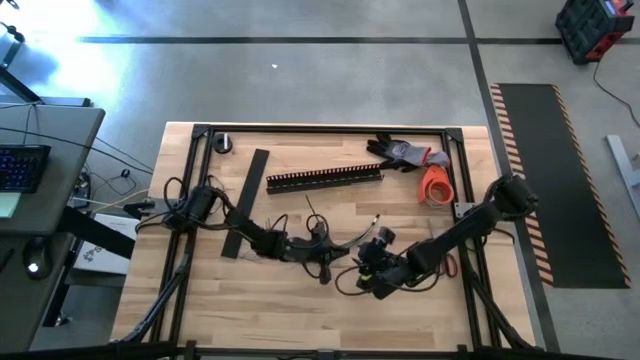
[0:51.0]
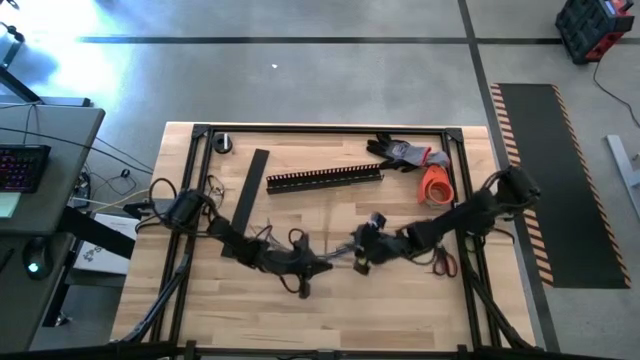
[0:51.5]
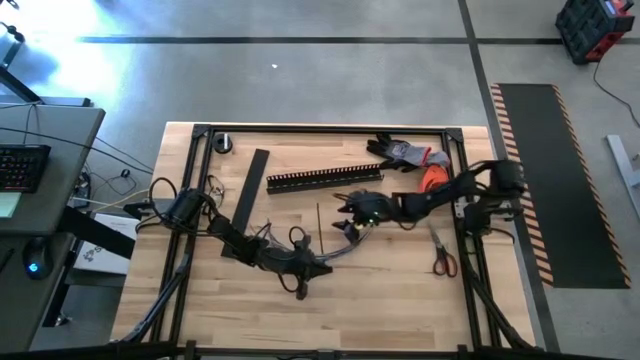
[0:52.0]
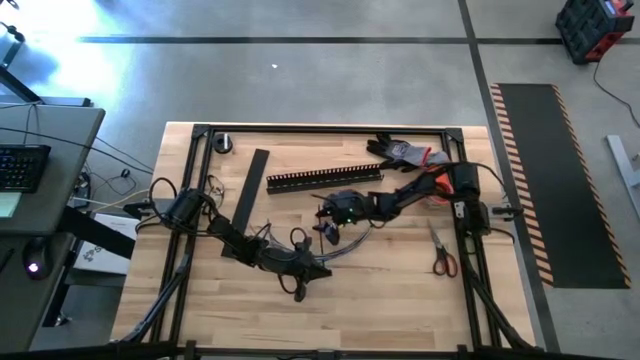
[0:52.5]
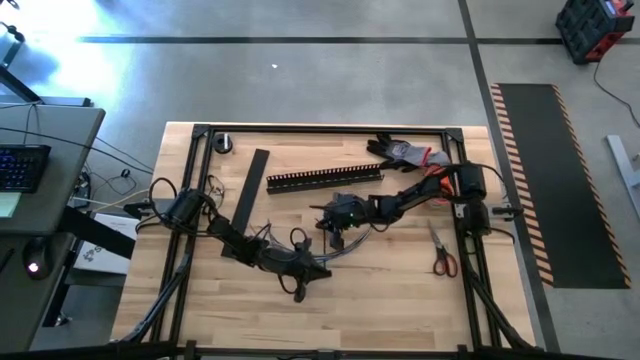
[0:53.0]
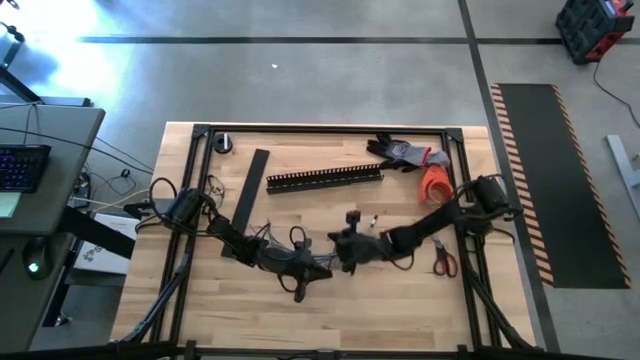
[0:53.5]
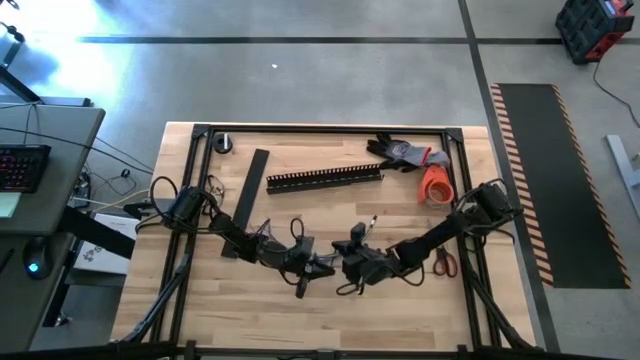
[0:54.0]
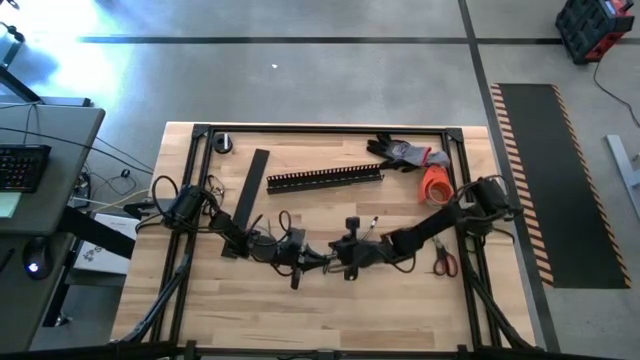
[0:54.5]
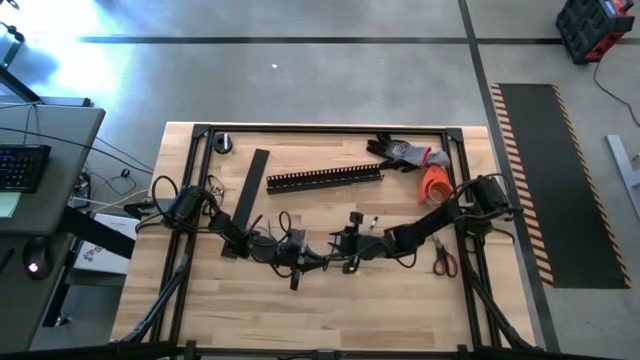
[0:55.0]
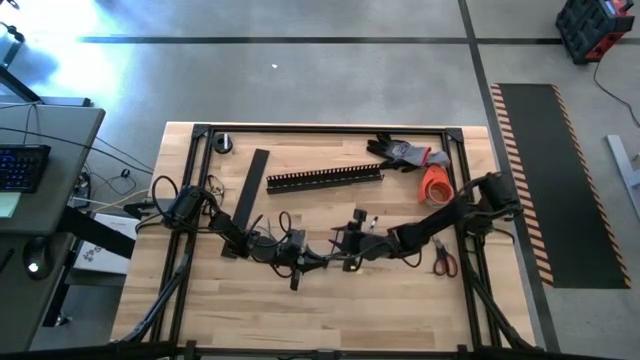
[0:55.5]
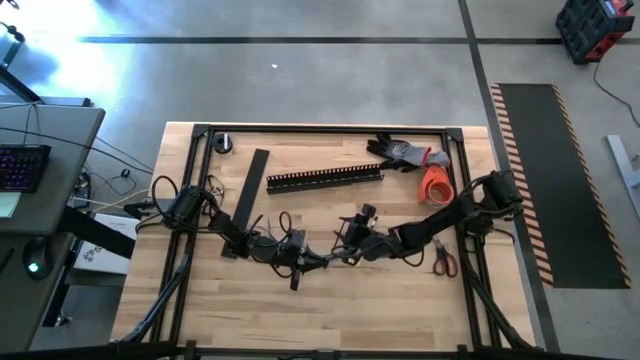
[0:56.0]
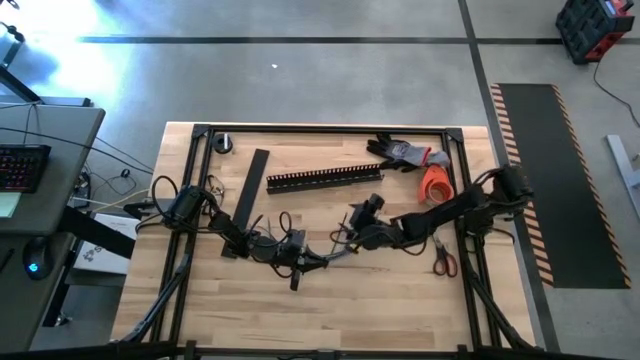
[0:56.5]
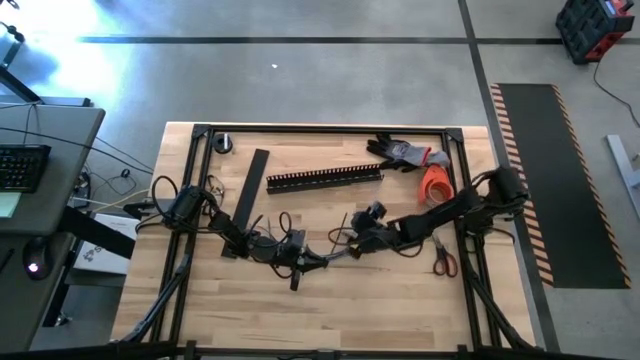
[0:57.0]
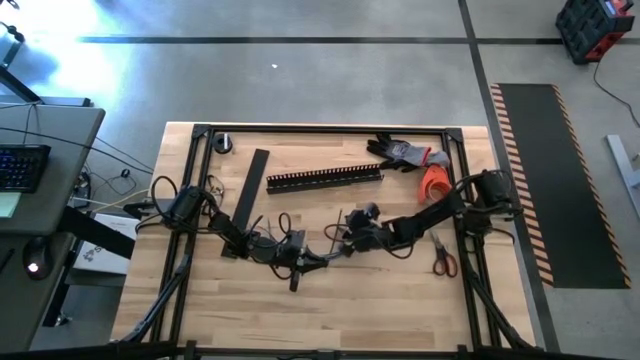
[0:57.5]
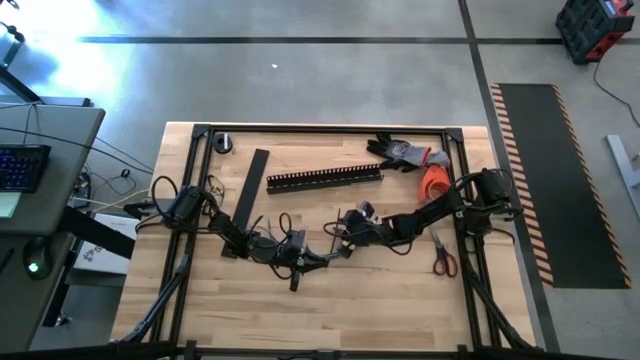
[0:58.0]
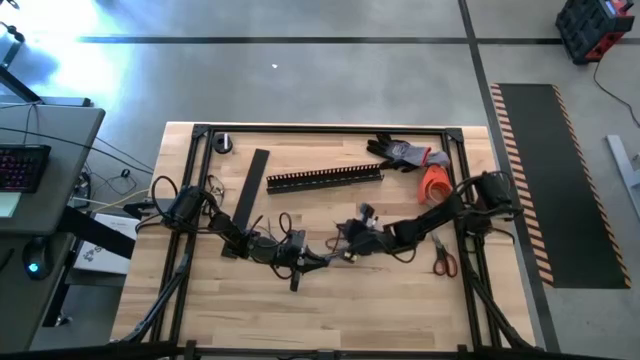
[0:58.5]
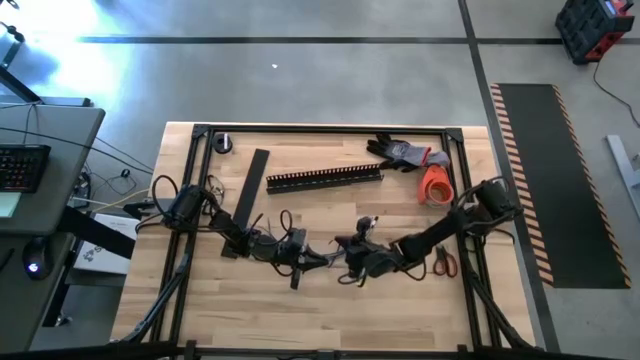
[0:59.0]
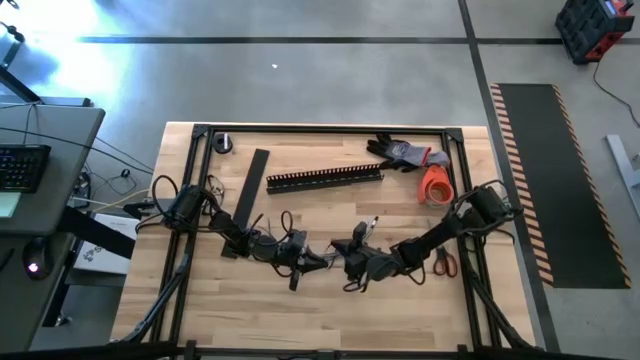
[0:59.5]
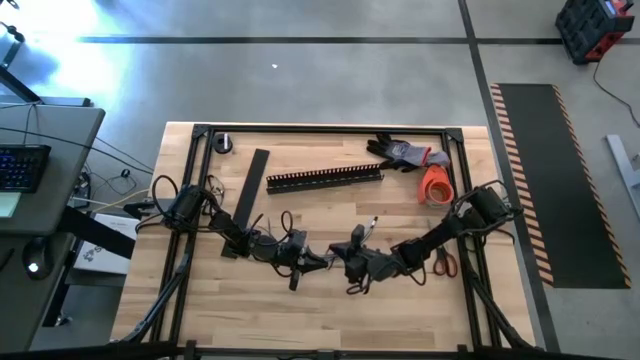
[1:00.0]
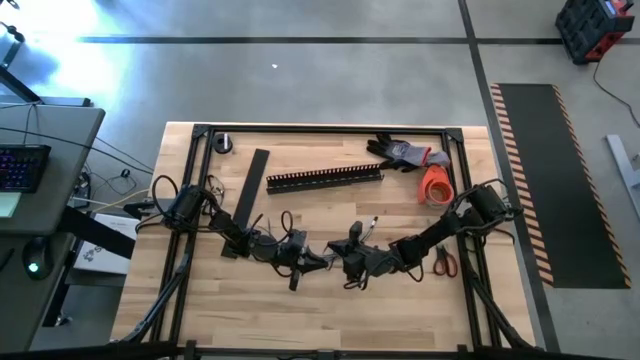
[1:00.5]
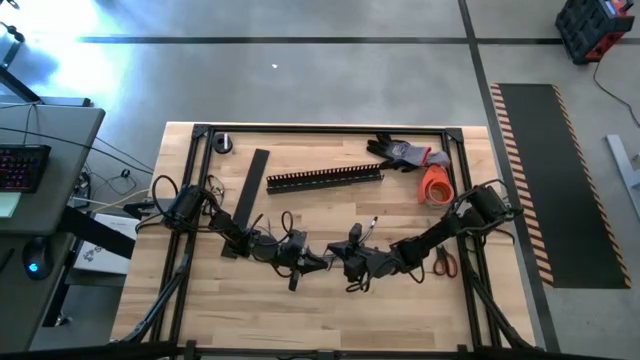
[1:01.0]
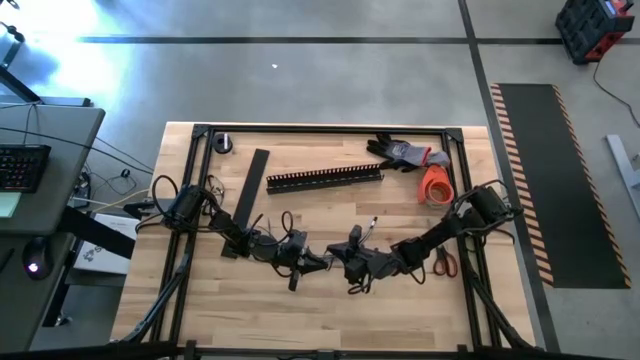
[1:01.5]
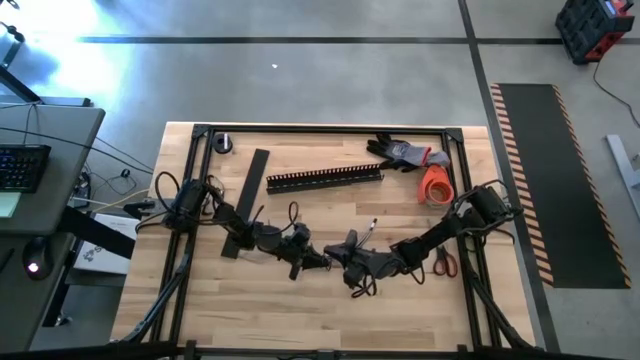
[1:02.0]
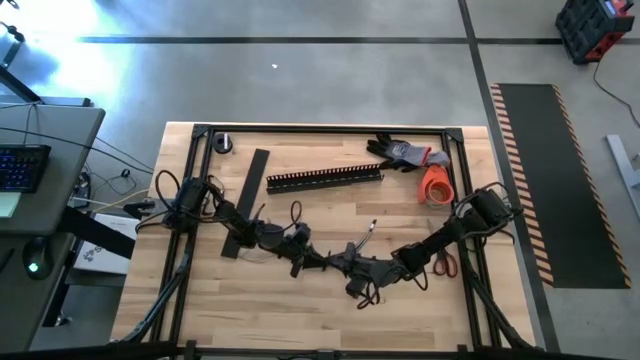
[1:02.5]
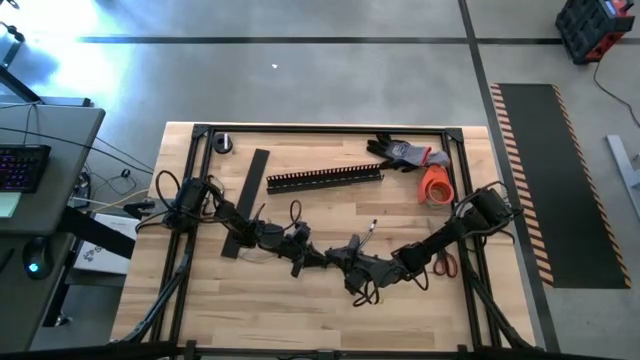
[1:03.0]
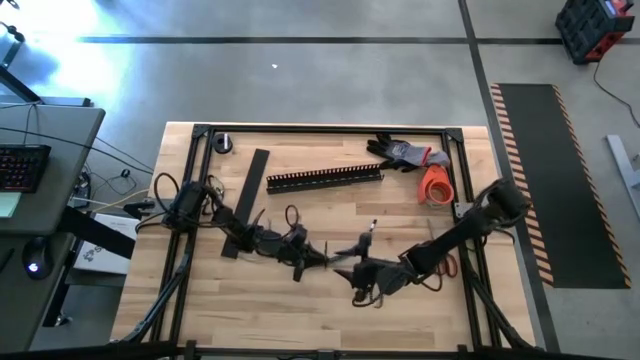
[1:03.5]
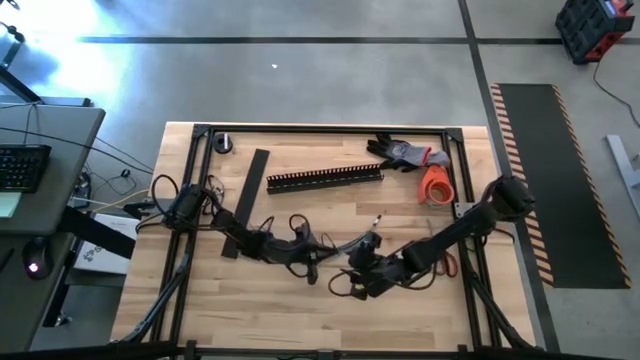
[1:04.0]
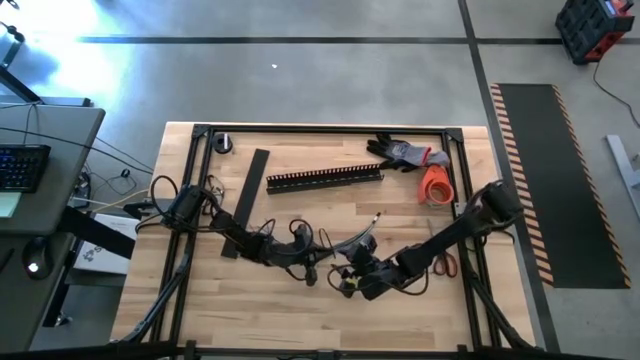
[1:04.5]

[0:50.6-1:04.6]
Task: Ziptie cables
Wrap the cables together using a zip tie
